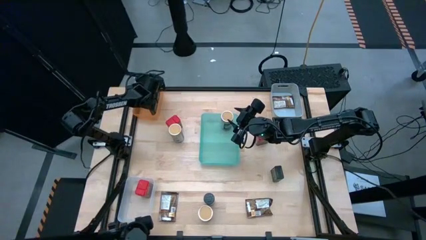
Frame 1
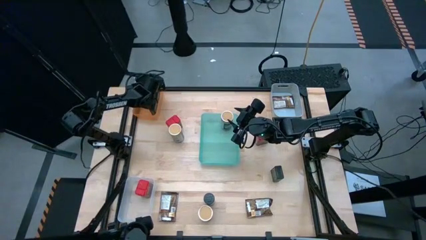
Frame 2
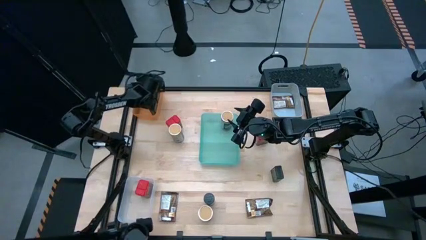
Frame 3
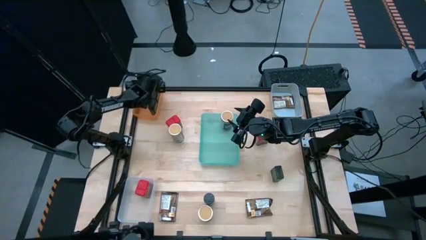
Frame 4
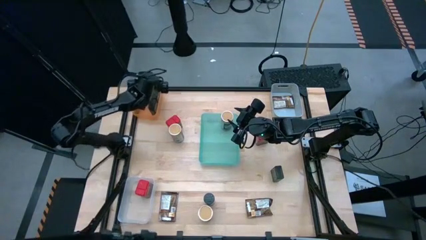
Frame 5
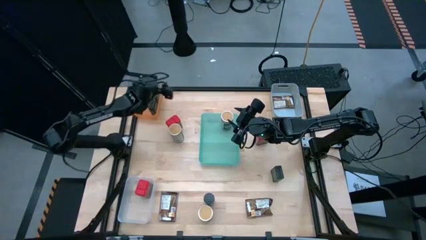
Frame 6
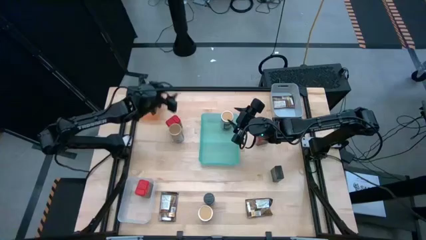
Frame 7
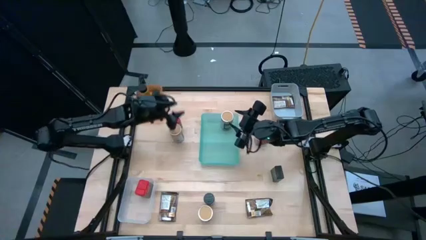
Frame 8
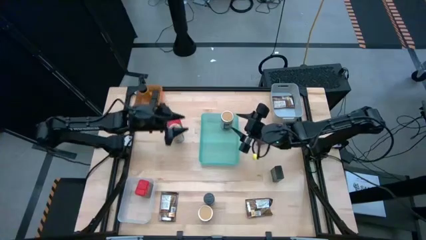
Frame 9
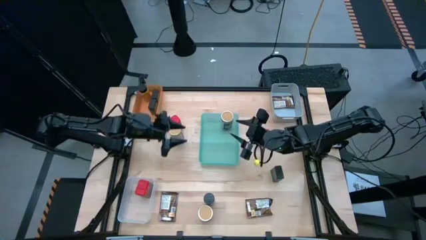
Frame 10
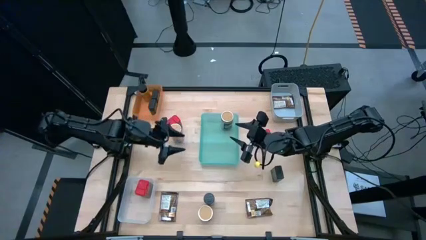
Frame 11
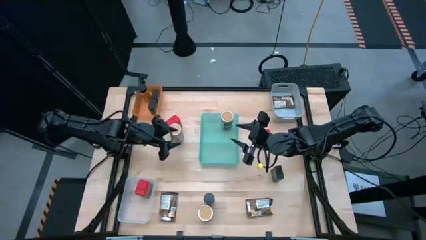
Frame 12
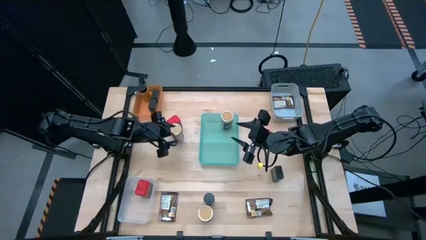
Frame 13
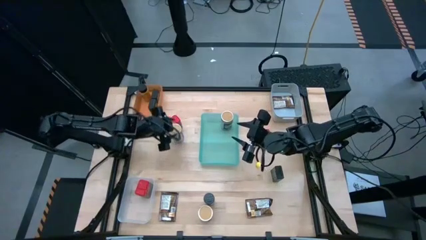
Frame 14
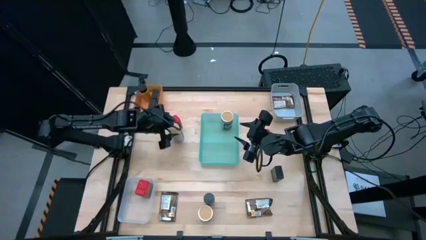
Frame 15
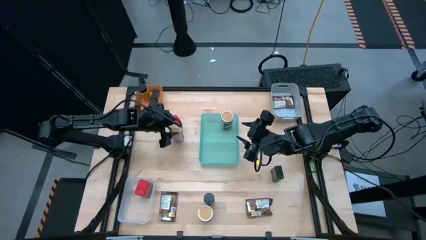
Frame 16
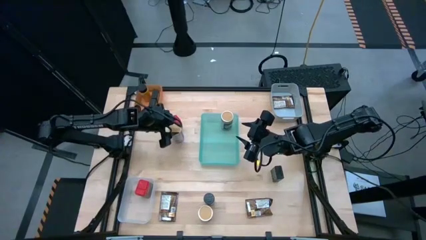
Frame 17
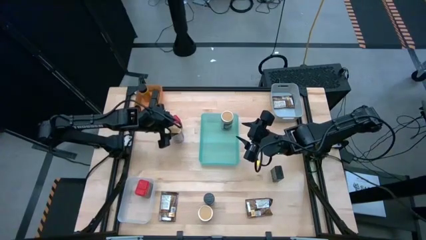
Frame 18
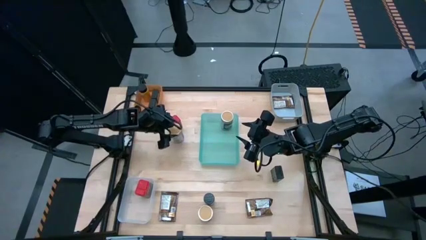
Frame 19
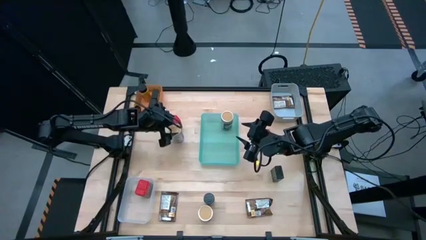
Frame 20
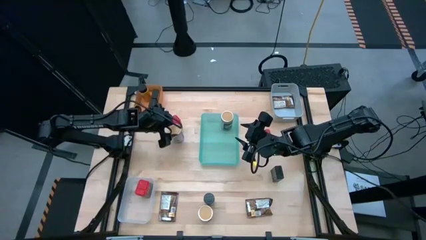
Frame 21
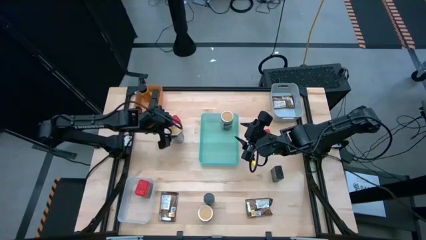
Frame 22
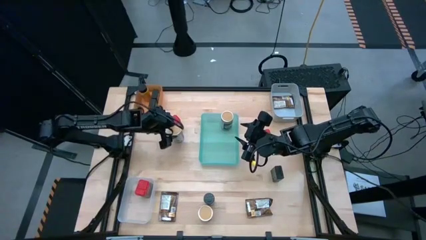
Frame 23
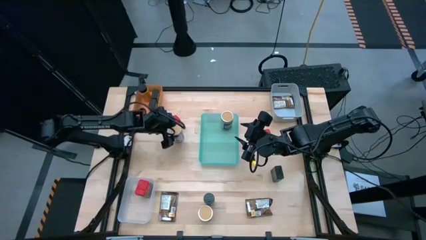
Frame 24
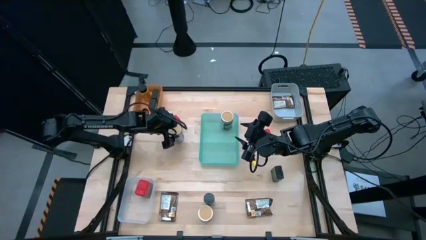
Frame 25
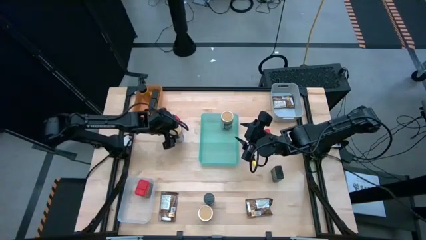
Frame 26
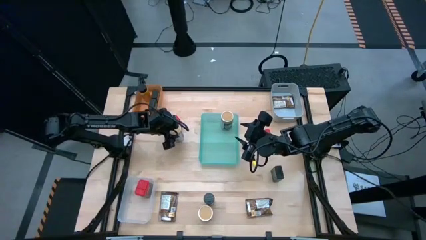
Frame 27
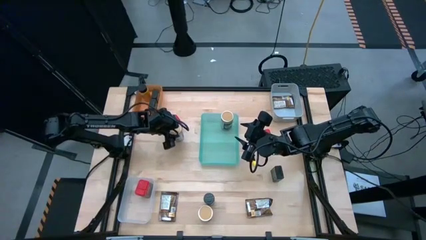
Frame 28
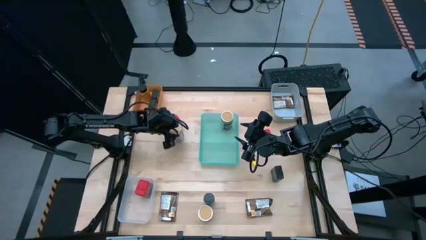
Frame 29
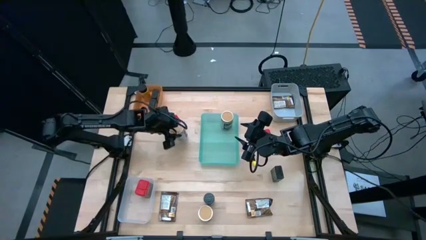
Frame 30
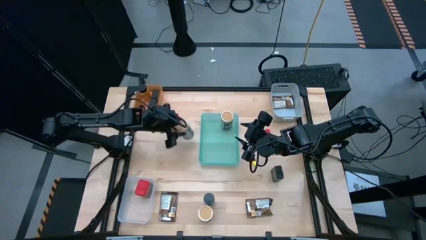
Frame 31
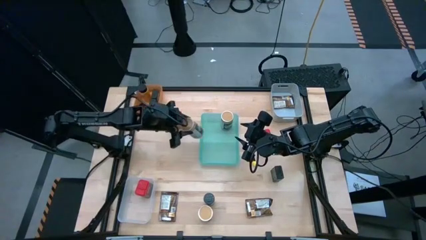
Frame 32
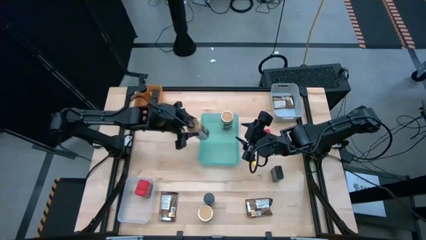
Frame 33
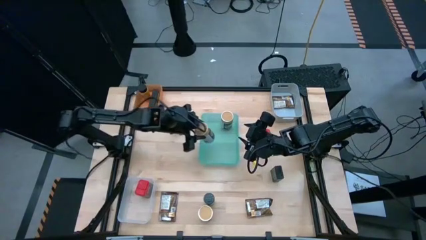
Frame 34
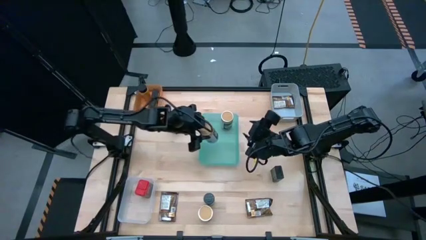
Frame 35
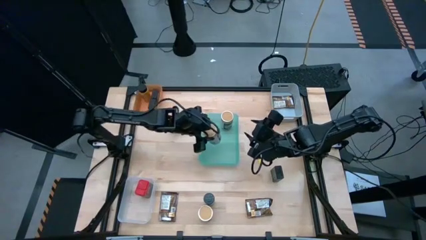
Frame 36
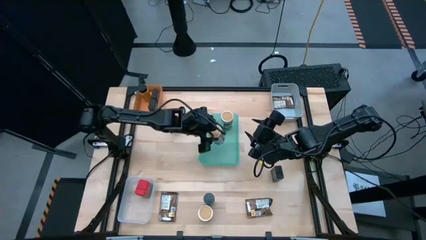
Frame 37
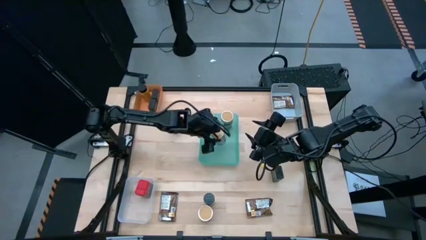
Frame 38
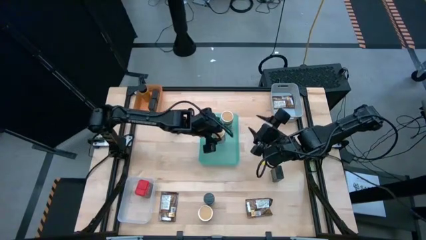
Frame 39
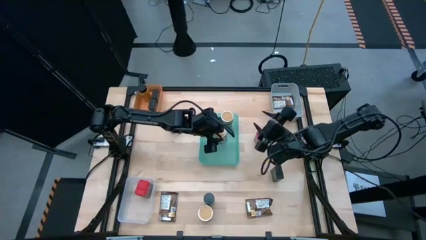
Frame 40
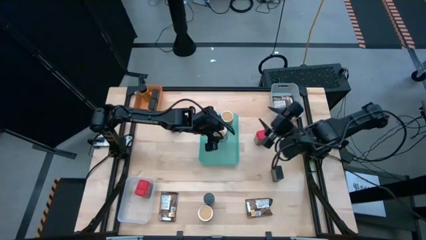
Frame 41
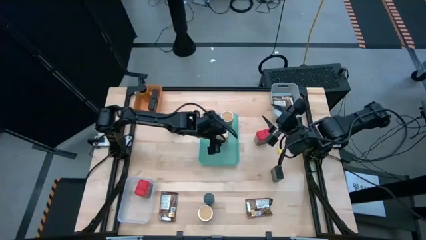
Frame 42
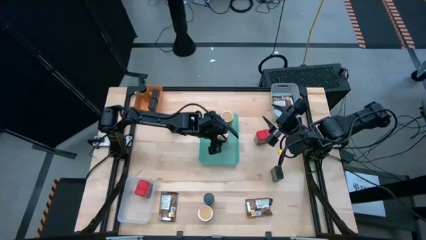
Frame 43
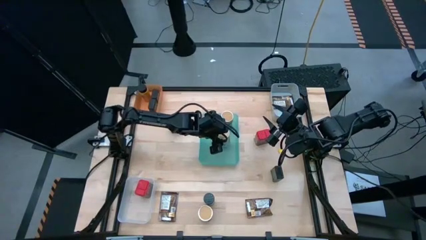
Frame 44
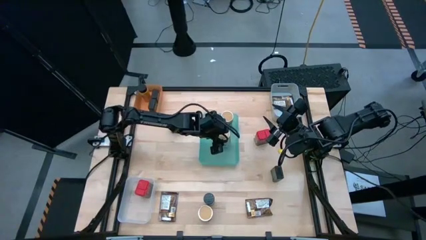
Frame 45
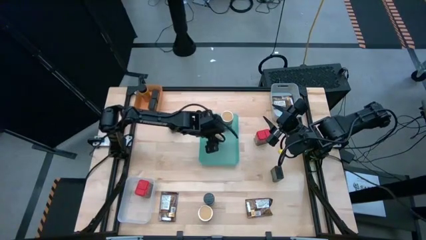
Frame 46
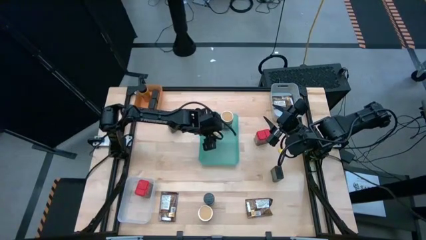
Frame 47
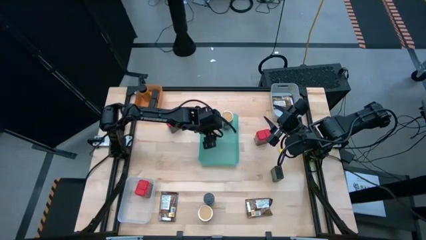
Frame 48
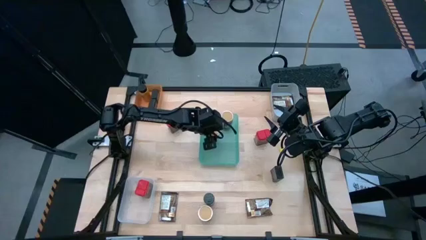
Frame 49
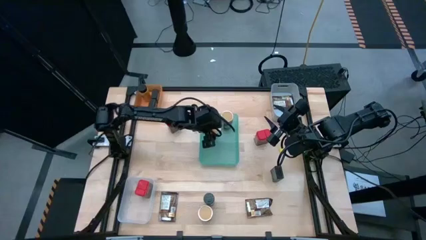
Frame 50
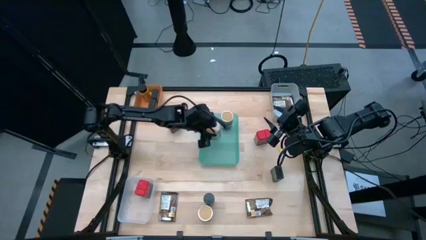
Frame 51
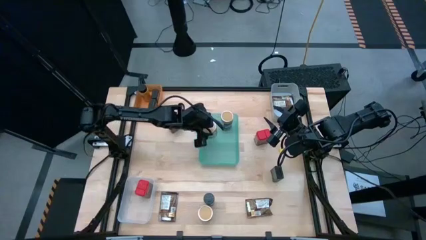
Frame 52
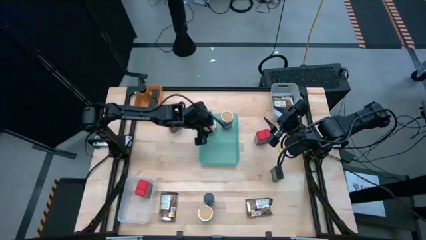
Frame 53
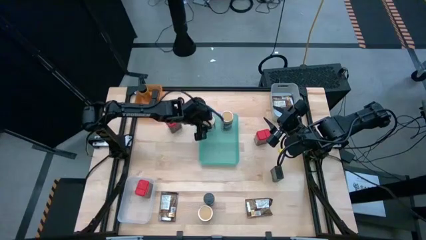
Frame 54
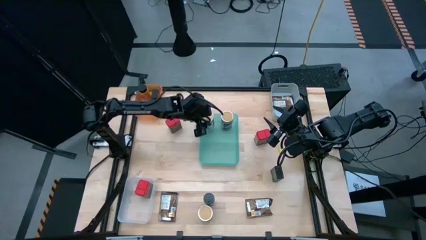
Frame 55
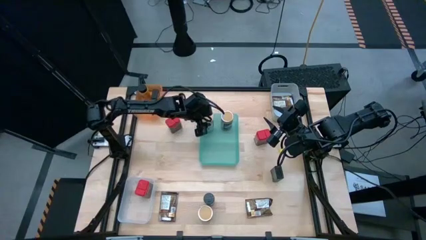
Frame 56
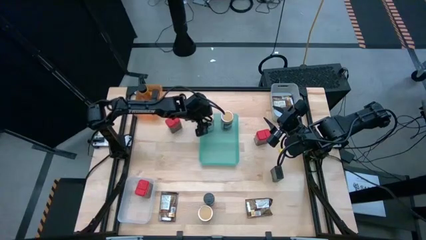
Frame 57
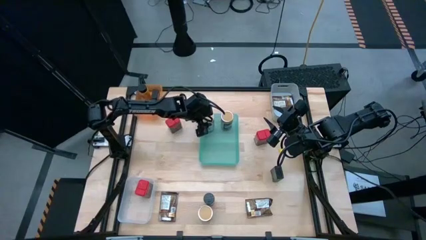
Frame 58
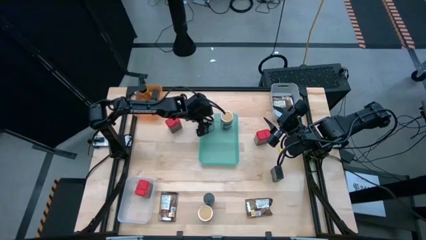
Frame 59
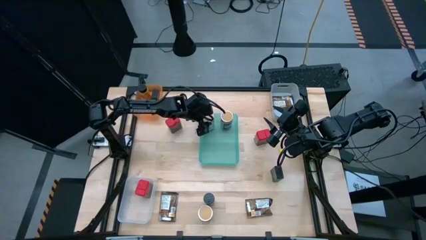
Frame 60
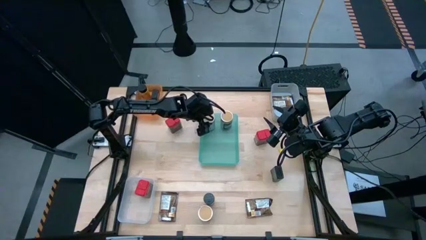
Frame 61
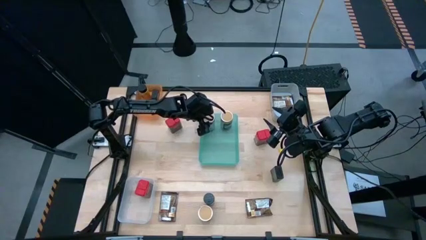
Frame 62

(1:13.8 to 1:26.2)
Task: Sort spices by type
Put the top brown seasoning bottle into the blue bin
